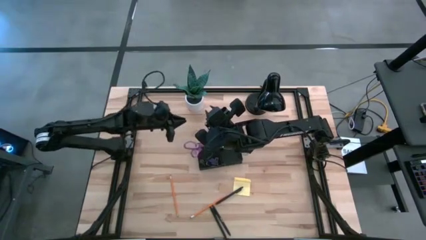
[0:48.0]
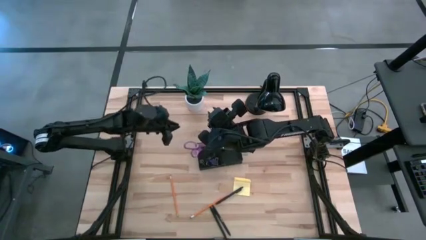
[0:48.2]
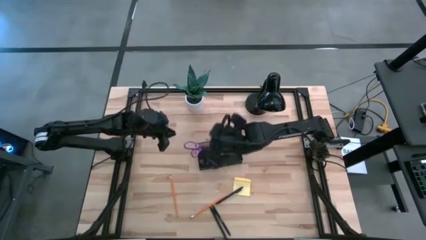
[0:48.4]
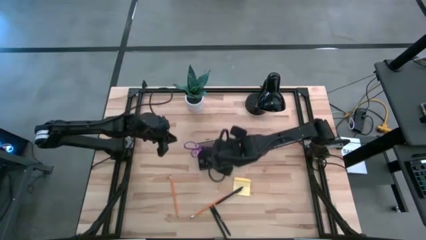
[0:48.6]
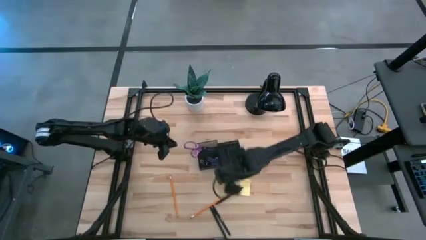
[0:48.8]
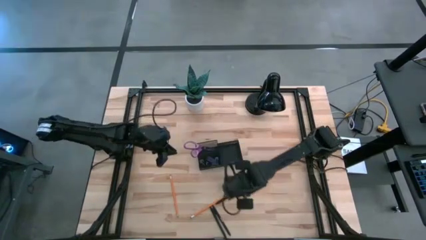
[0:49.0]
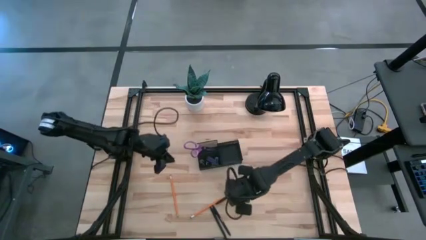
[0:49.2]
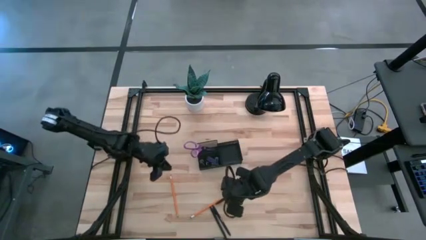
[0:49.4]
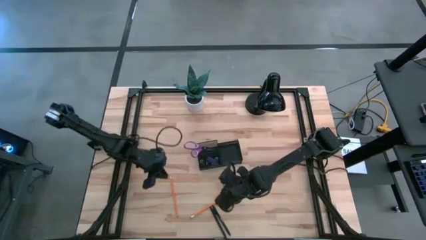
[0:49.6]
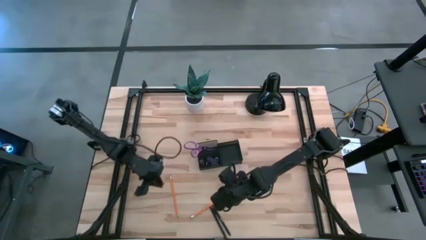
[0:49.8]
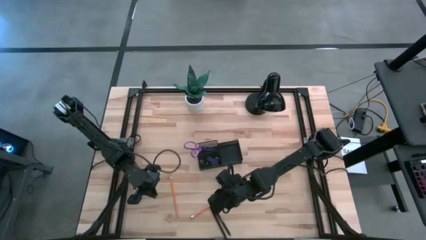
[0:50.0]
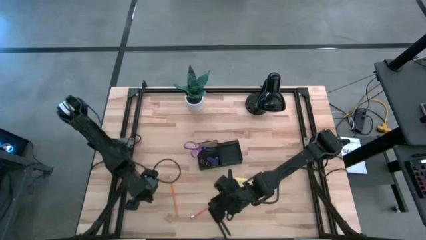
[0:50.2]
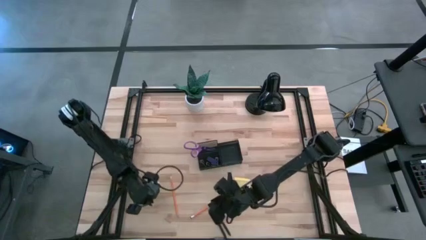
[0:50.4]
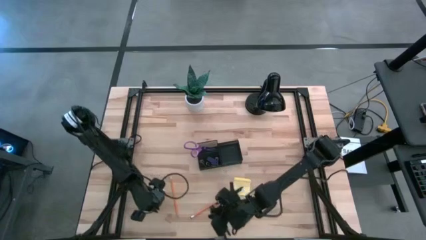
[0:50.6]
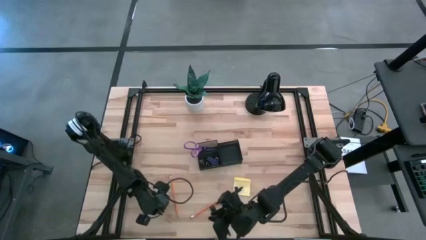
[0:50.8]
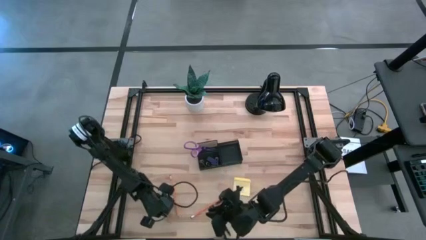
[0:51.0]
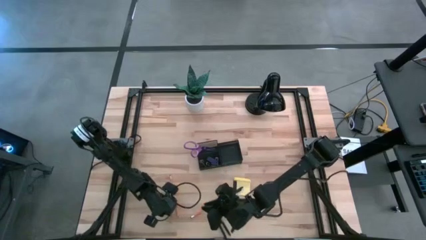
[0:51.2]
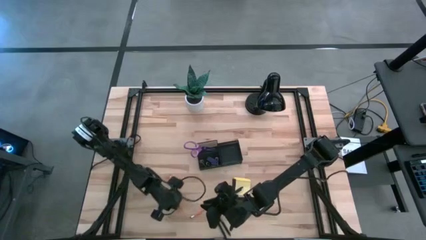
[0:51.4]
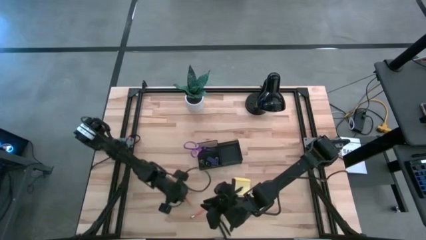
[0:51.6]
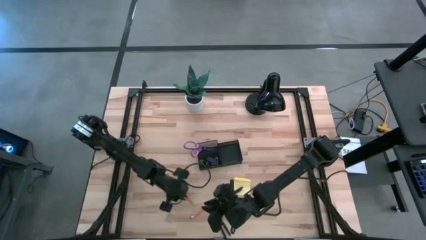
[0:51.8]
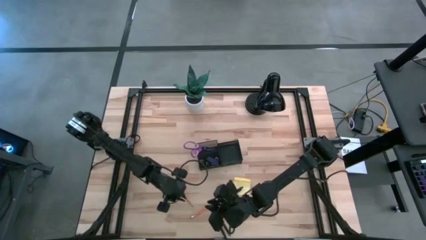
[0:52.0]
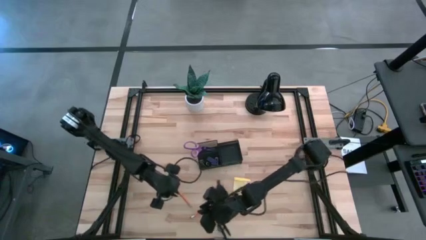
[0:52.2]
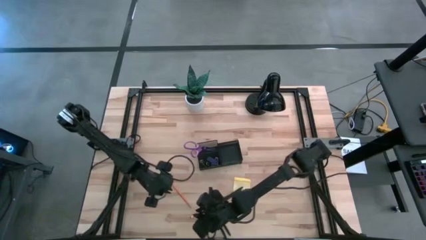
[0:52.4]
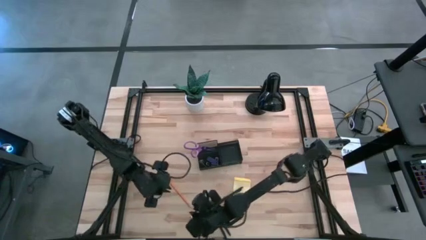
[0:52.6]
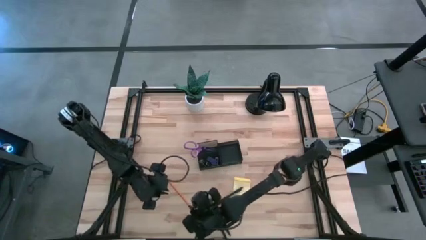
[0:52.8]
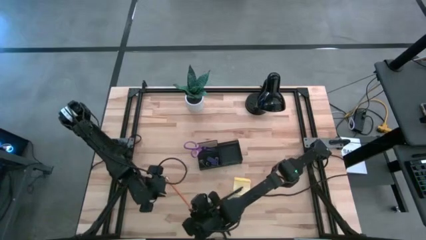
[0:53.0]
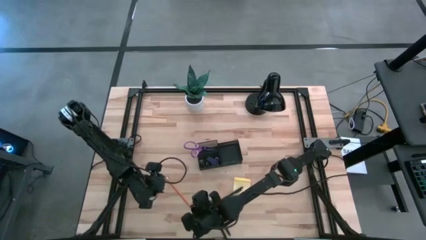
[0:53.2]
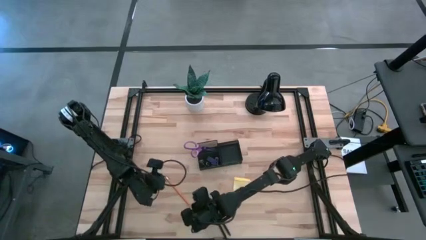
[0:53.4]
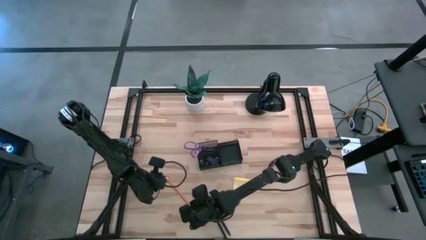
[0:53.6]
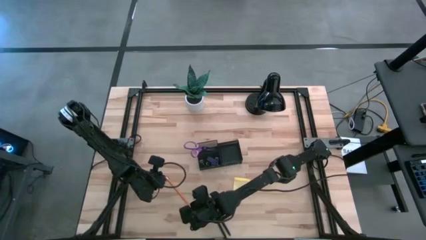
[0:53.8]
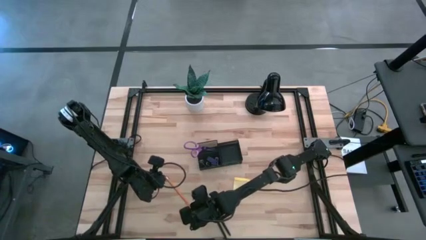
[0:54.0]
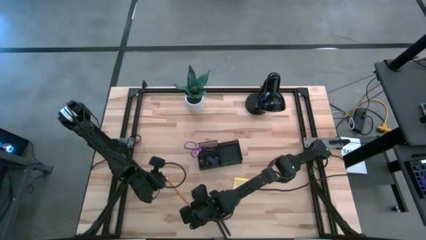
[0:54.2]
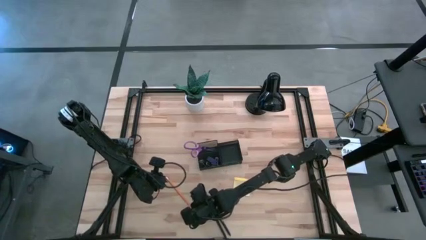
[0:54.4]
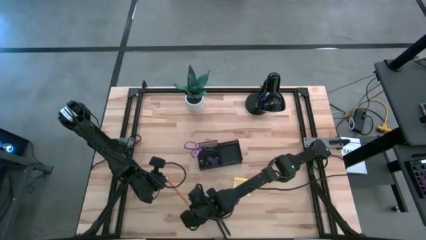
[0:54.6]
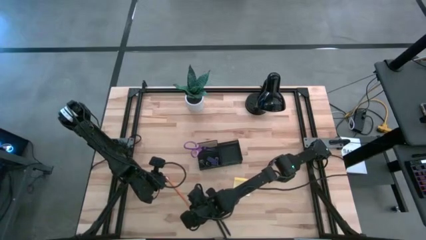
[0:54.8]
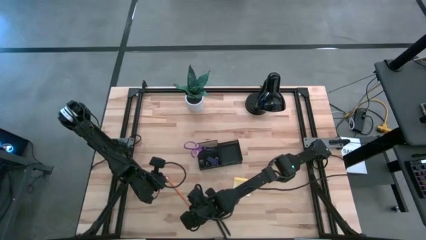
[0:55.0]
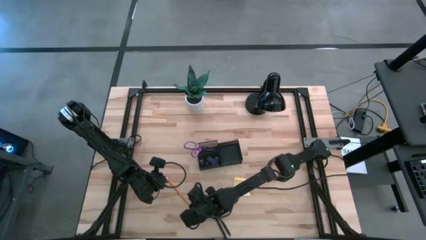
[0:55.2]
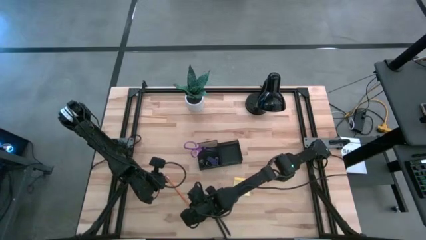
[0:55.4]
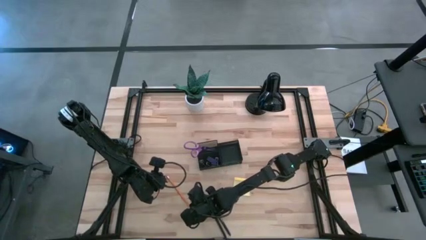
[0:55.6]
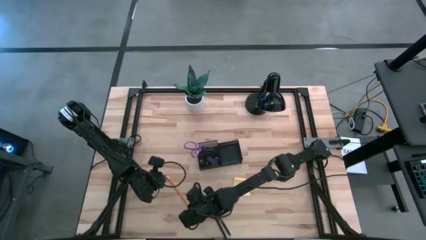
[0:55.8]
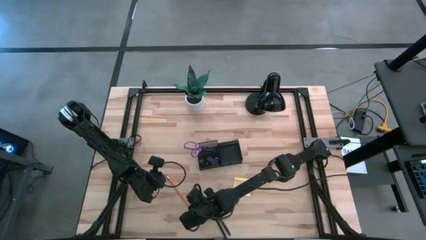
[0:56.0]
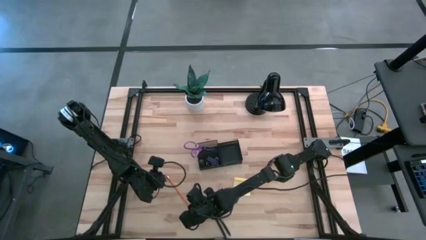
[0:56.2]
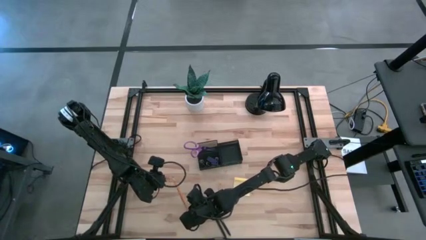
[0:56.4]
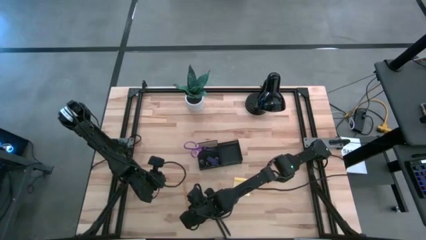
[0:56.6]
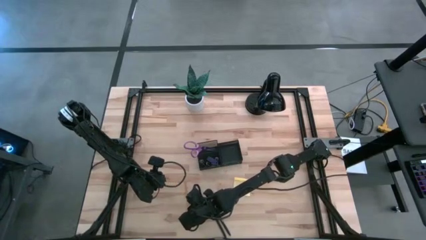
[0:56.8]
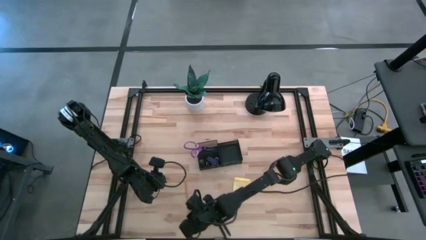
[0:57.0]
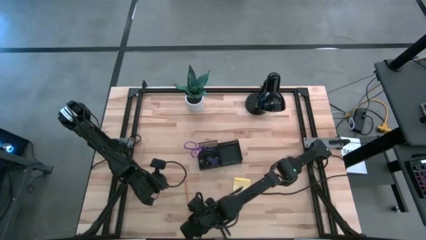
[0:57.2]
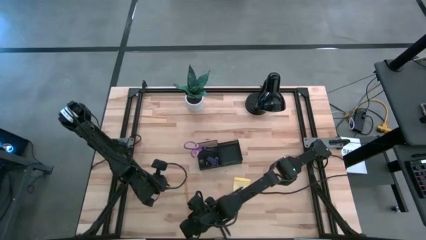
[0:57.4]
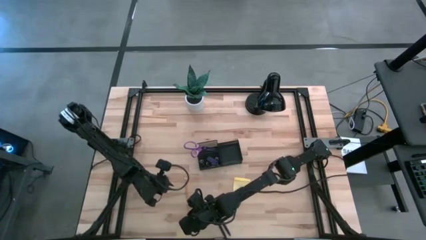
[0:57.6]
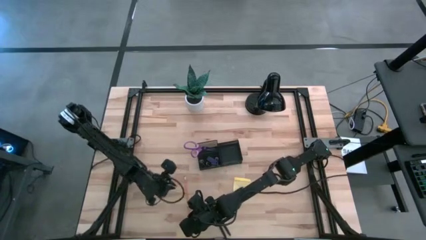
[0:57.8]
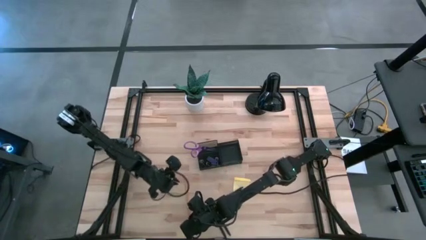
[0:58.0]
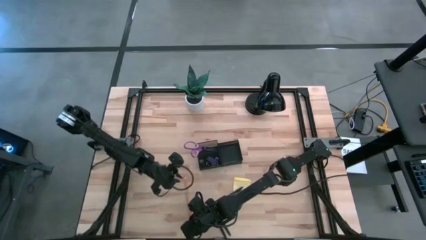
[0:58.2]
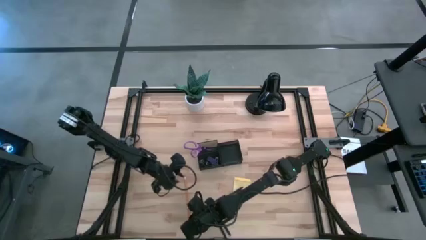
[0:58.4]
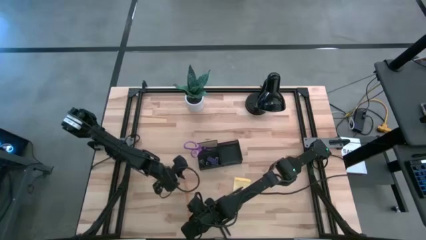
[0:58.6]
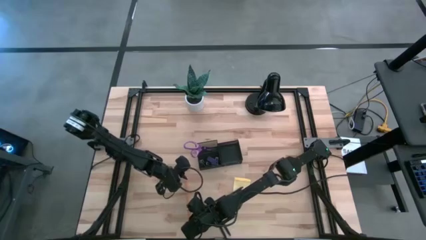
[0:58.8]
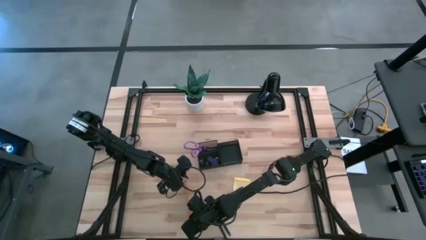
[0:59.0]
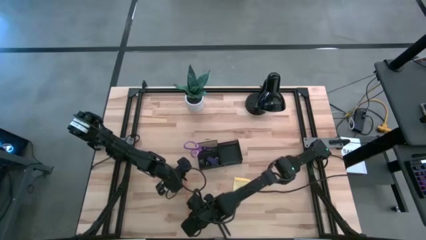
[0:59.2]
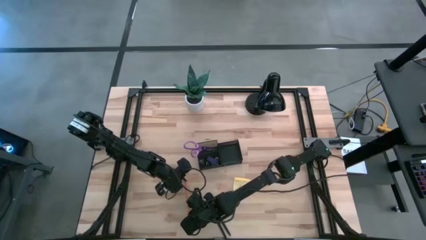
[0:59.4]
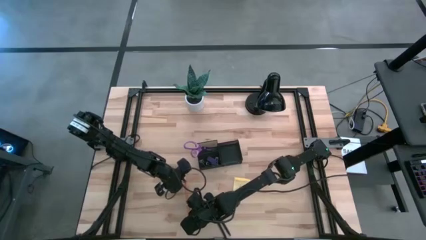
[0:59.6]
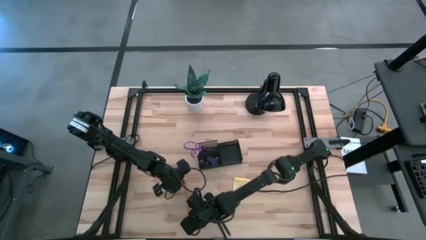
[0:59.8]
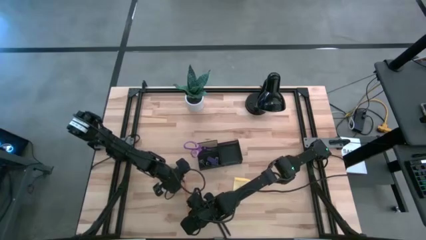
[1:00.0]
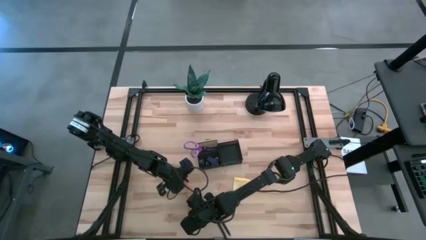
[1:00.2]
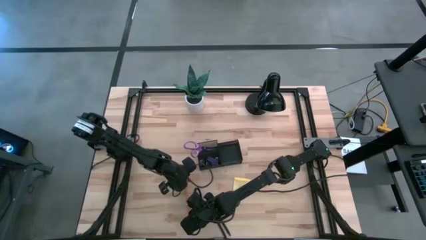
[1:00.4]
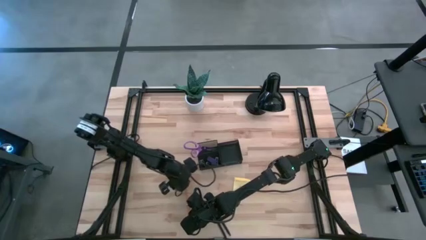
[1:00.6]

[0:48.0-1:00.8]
Task: Pick and place office supplies into organizer
Put the left pencil into the desk organizer

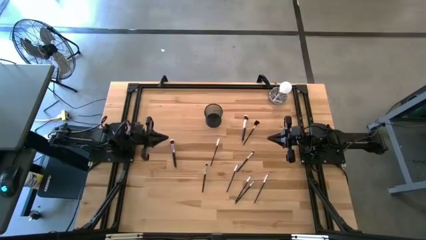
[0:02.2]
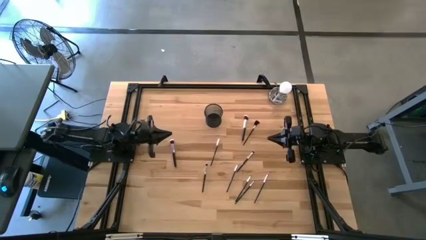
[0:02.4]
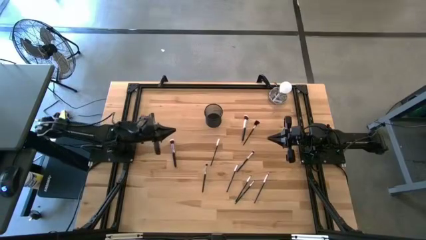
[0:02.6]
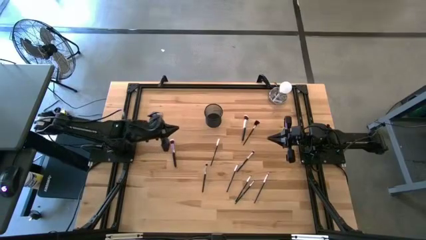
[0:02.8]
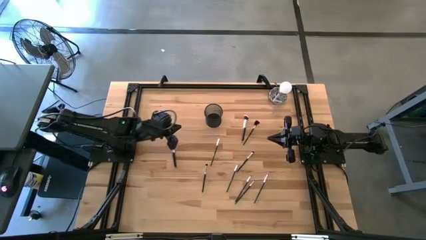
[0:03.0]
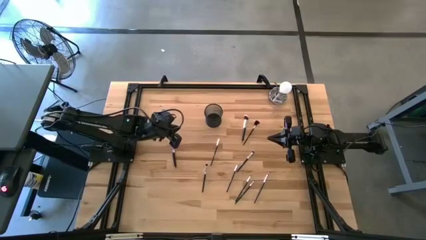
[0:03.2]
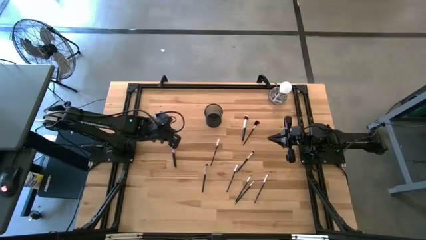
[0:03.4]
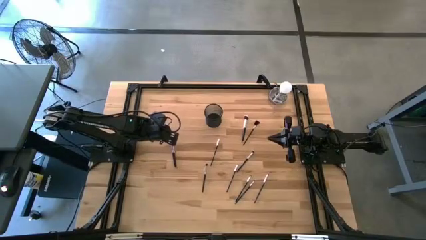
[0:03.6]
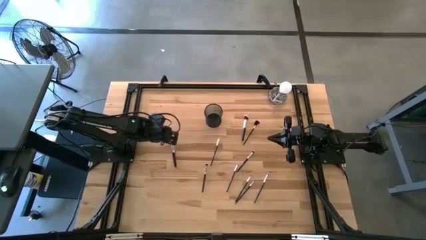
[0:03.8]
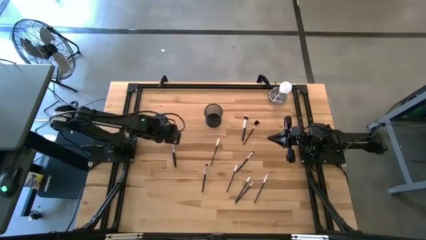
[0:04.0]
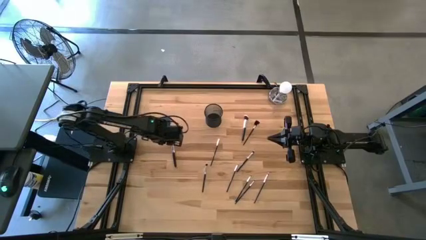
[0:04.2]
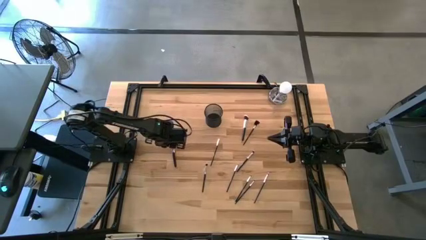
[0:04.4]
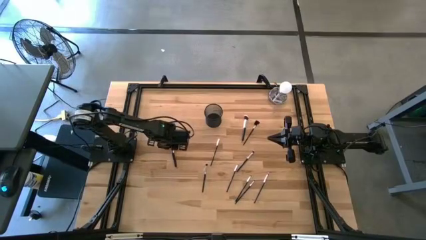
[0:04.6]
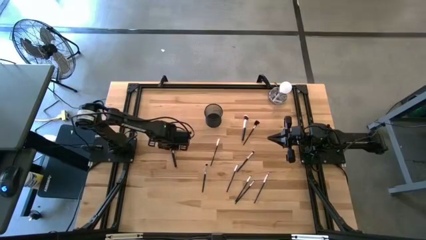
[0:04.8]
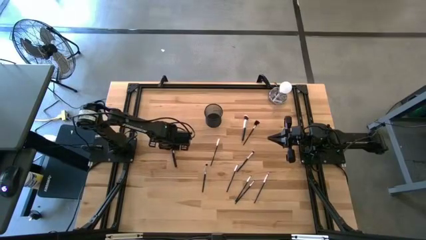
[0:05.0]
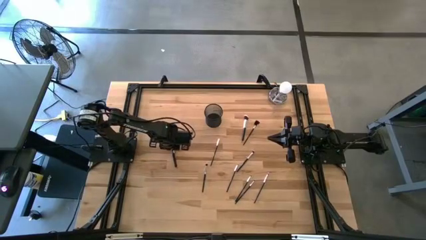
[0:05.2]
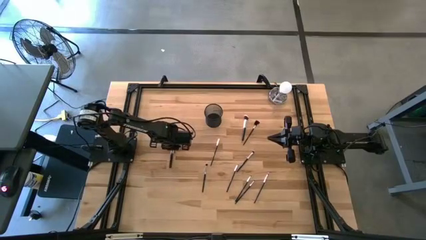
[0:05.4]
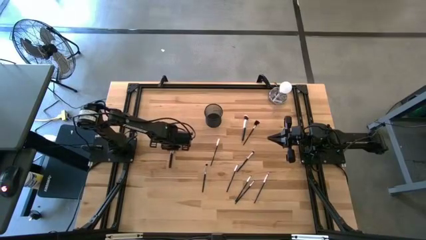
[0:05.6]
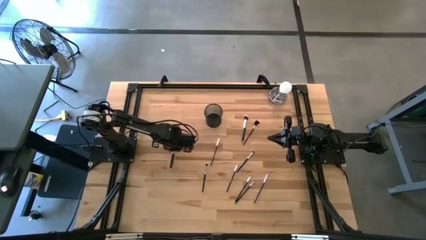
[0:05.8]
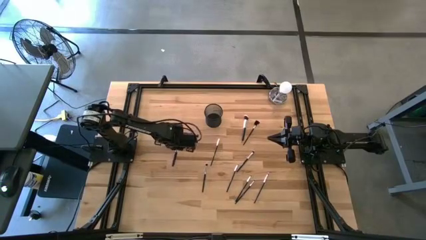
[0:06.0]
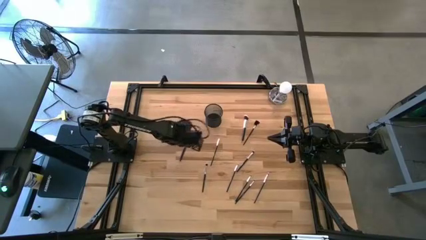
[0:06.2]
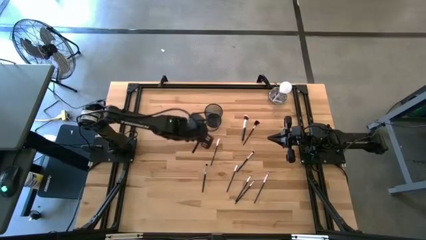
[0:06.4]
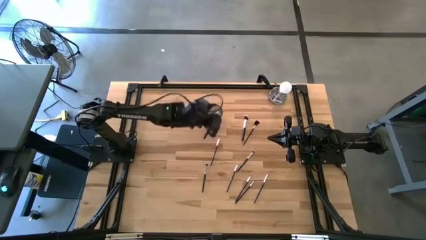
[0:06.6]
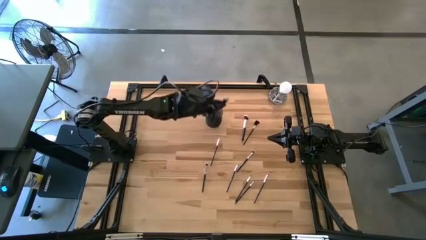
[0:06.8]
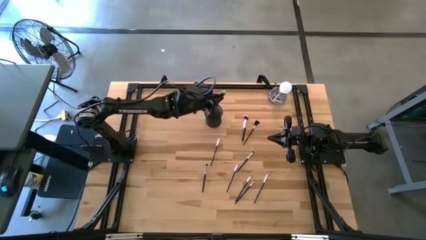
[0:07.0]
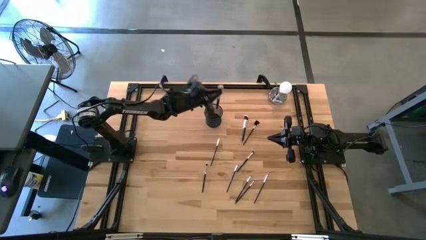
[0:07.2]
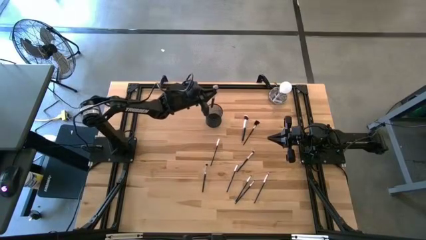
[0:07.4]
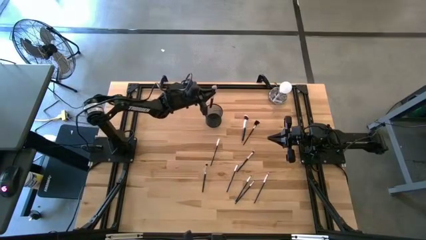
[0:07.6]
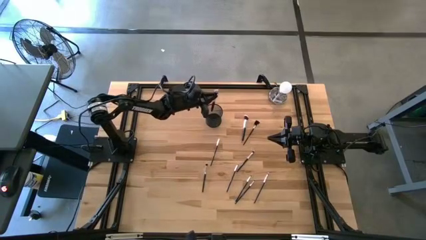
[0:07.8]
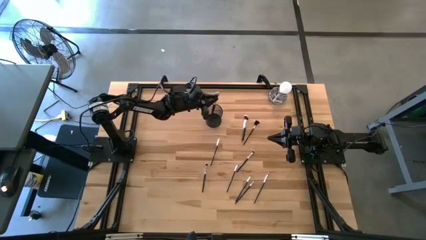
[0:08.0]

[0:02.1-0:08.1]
Task: Pick & Place Makeup Brushes
Put the large white make-up brush into the black container
